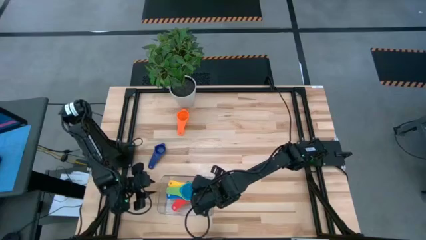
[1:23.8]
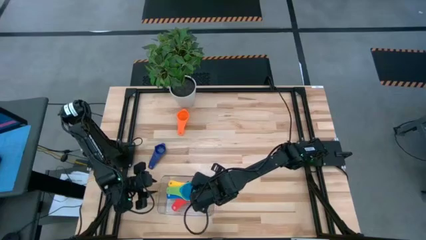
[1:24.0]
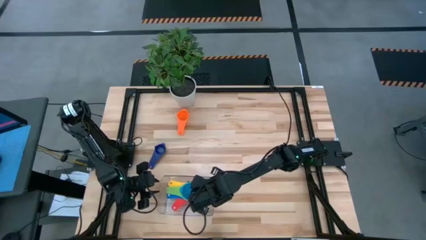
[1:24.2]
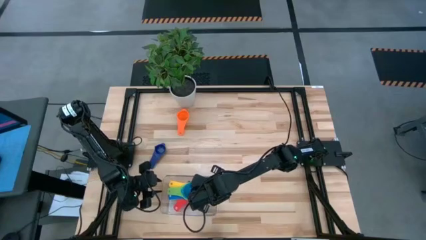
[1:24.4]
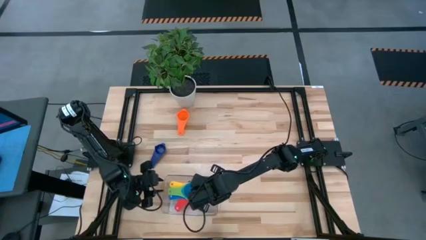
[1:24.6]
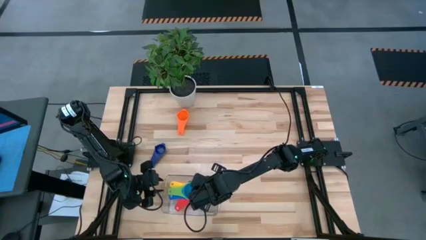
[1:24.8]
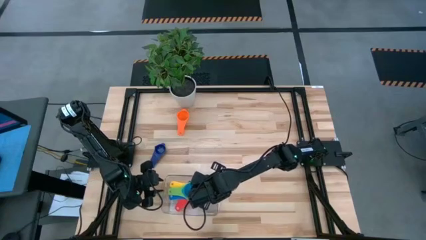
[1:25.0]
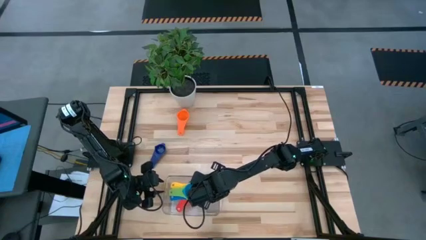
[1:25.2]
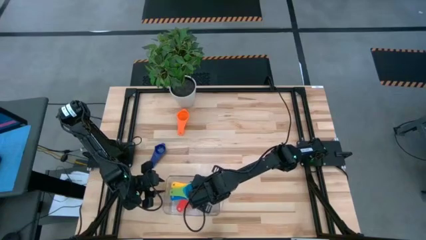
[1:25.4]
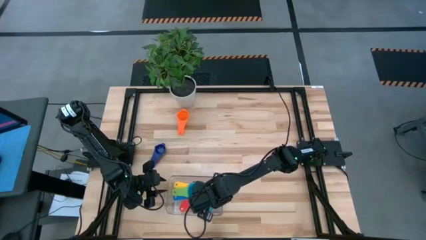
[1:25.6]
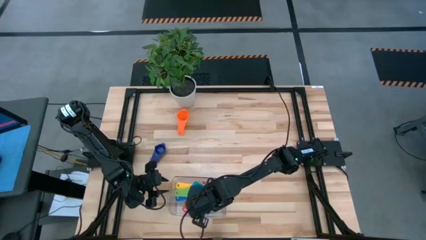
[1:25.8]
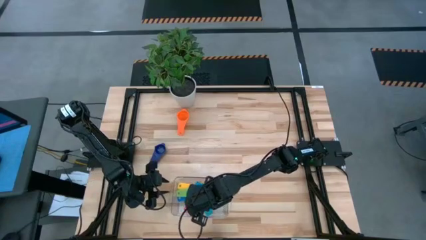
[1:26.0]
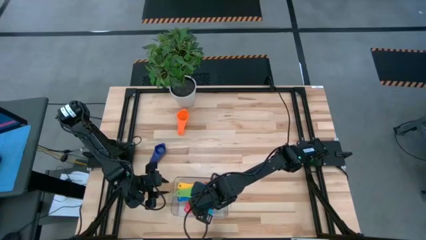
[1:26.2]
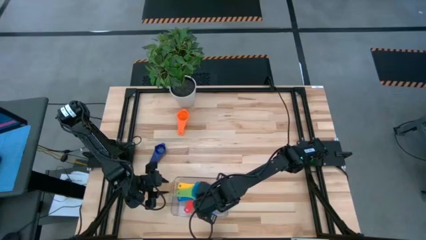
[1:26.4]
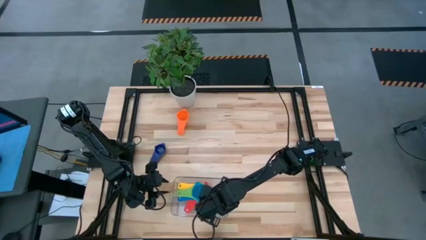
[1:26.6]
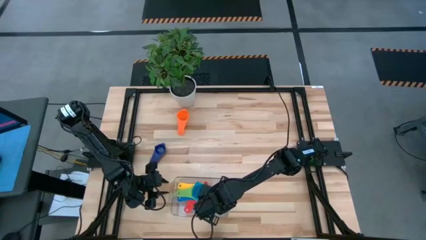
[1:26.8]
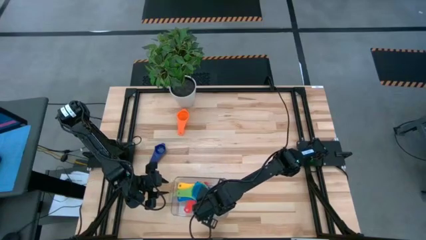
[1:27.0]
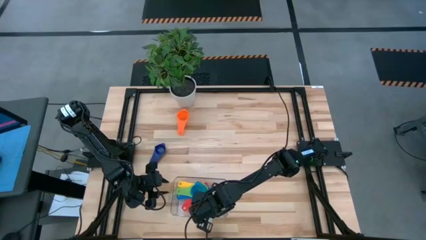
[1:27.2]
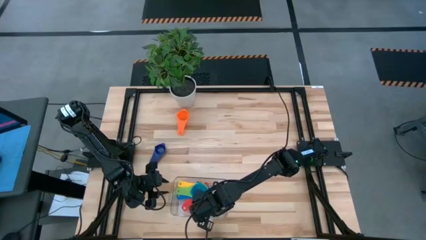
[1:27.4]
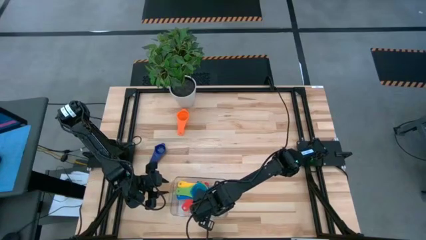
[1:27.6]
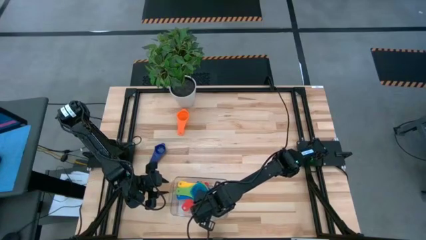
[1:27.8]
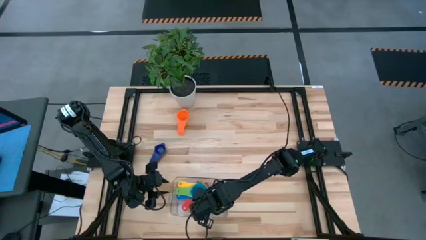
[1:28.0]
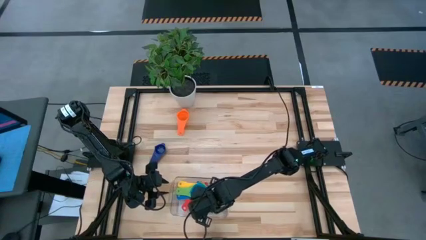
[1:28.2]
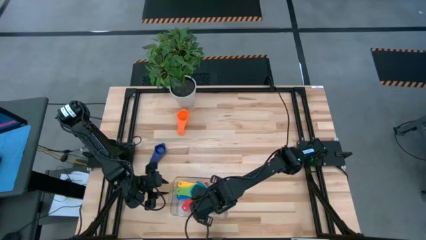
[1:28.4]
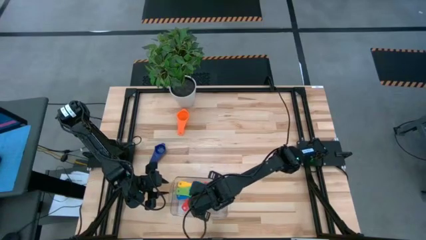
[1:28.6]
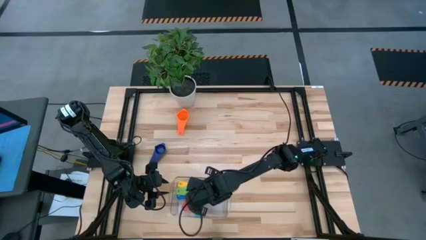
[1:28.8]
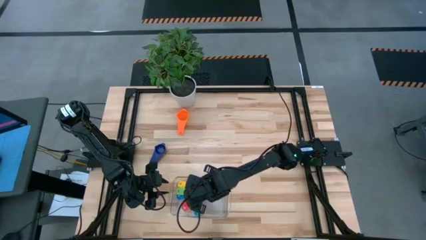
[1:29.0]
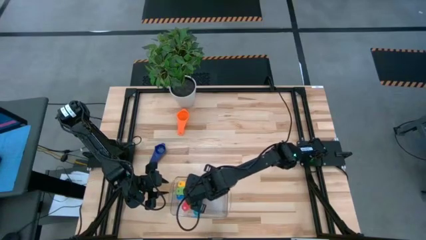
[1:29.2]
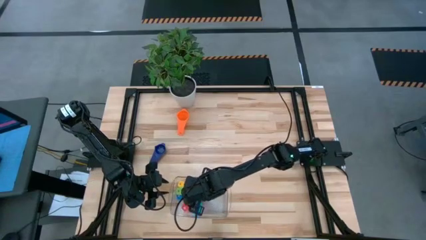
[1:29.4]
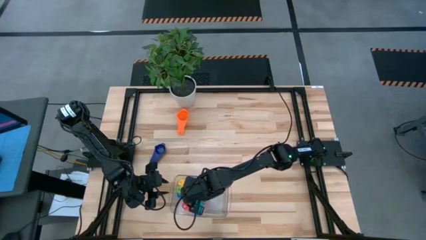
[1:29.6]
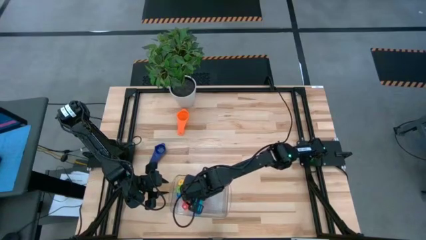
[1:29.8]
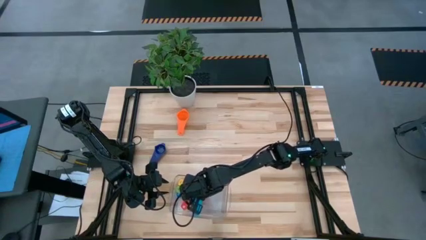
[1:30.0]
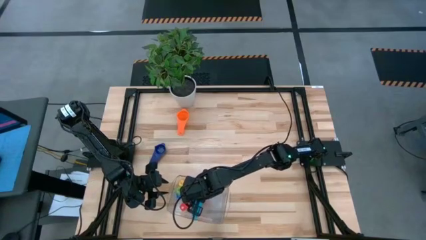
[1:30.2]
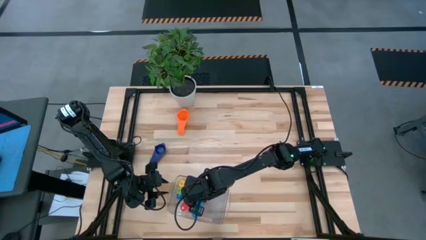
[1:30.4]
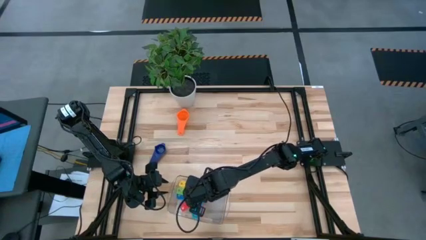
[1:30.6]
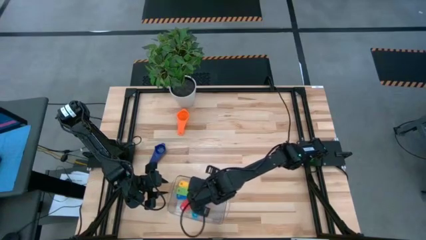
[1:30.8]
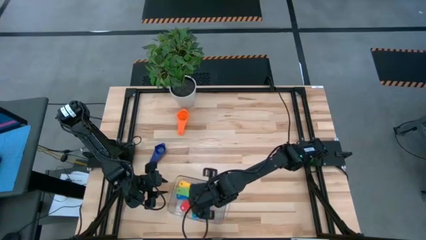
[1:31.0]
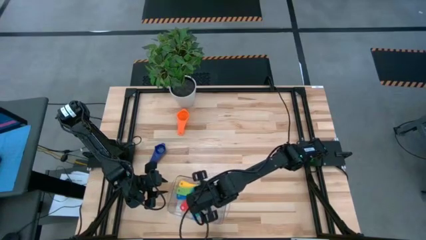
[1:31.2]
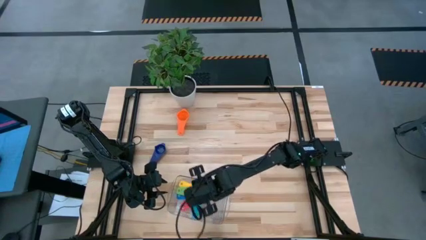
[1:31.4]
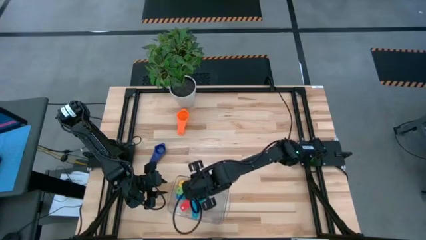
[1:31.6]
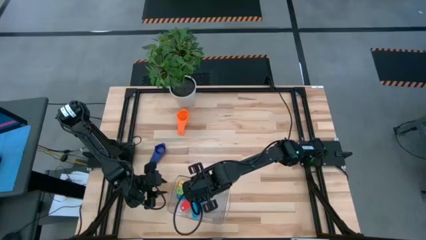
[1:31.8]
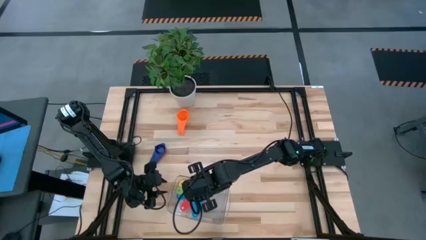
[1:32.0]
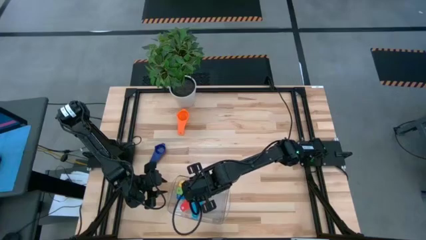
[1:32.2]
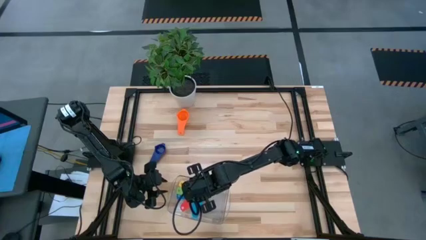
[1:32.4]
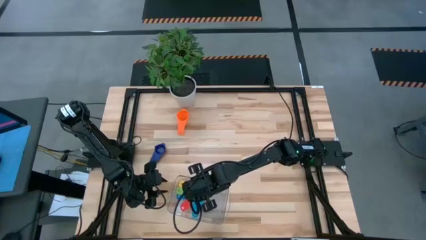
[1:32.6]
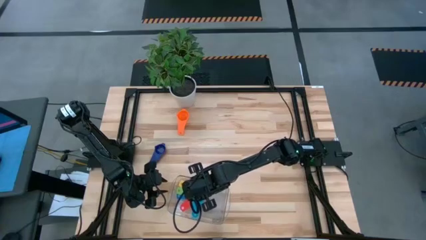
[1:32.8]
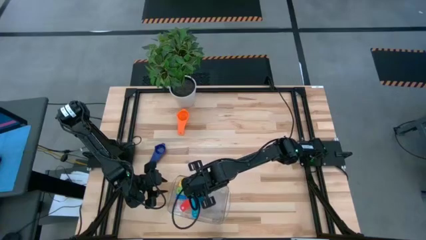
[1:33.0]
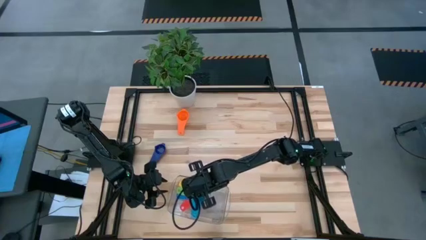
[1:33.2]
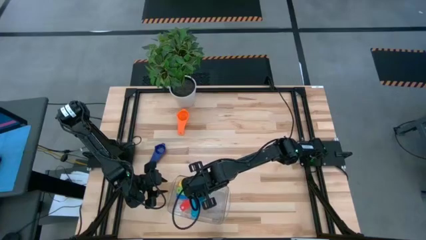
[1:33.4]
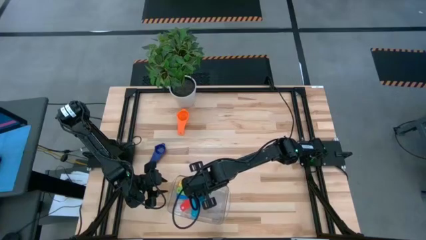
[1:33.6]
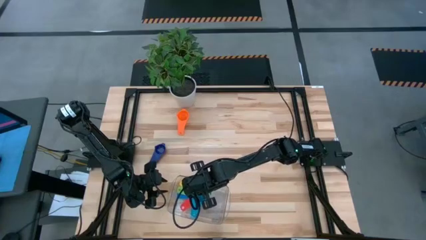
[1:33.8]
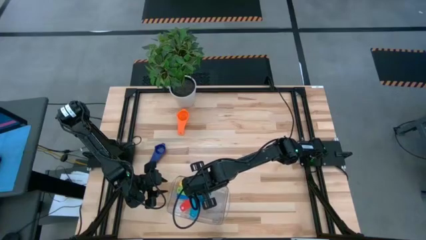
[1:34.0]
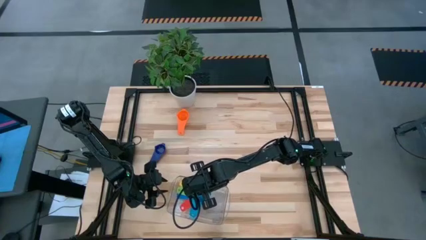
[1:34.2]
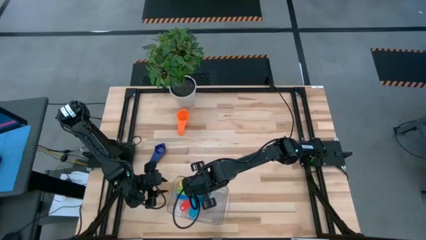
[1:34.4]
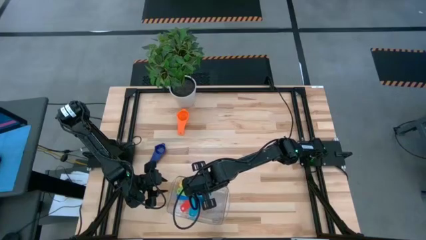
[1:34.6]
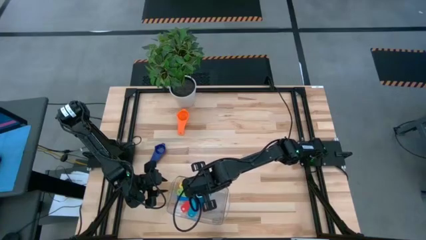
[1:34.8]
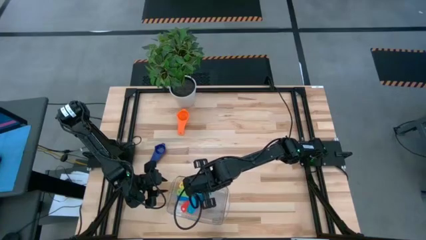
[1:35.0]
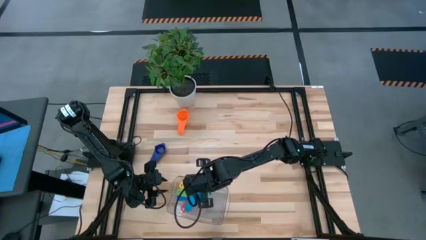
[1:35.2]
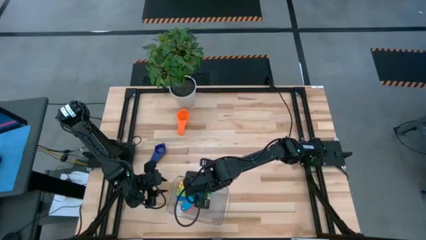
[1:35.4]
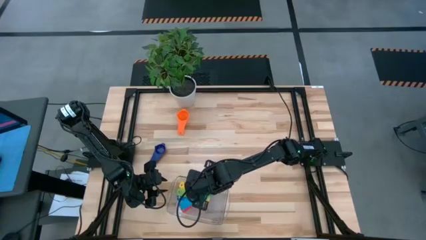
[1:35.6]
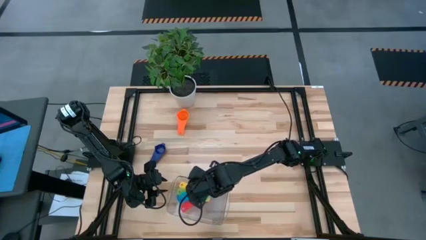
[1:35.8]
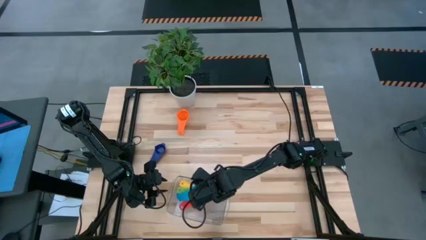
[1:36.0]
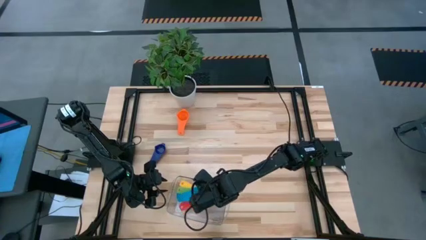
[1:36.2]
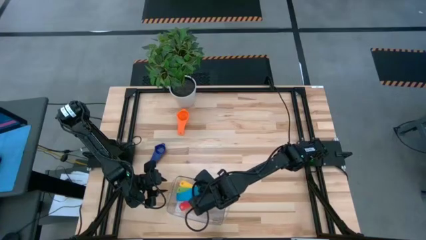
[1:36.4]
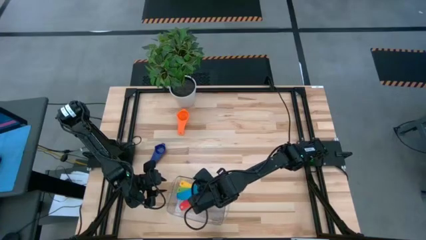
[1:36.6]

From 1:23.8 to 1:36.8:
Task: Nest measuring cups in basket
Stack the light blue measuring cup on top of the green measuring cup
